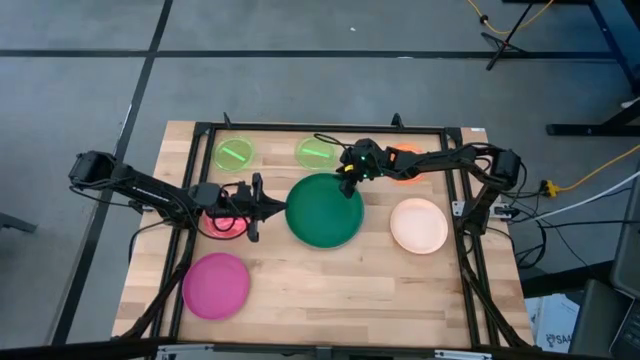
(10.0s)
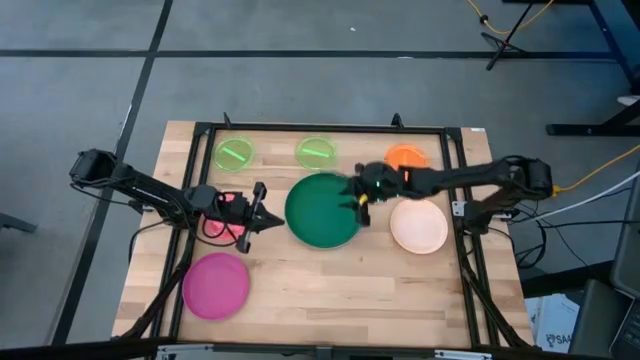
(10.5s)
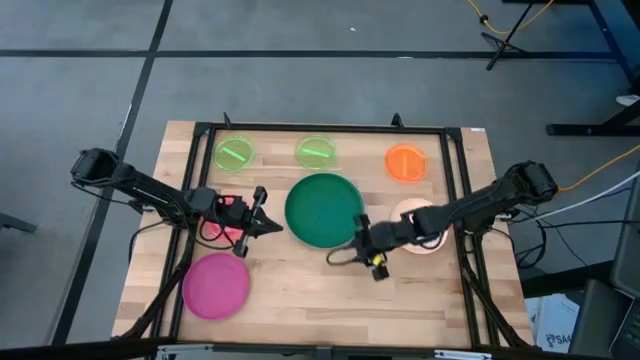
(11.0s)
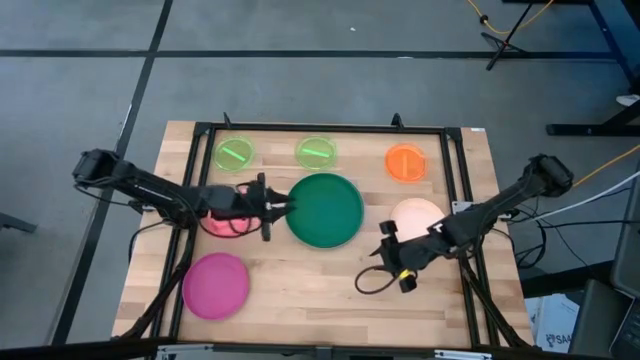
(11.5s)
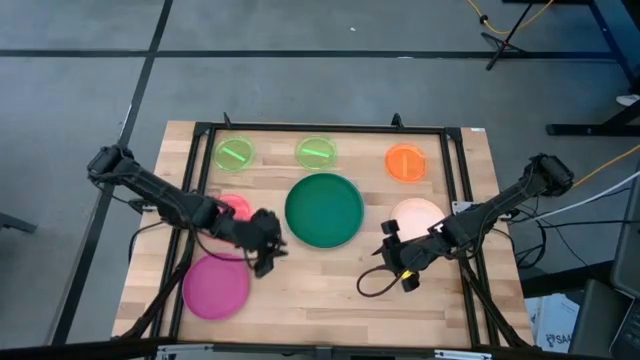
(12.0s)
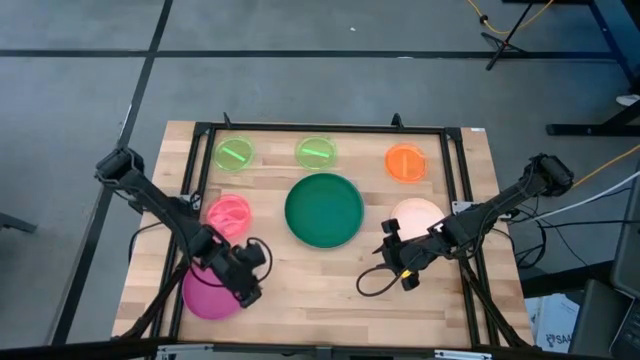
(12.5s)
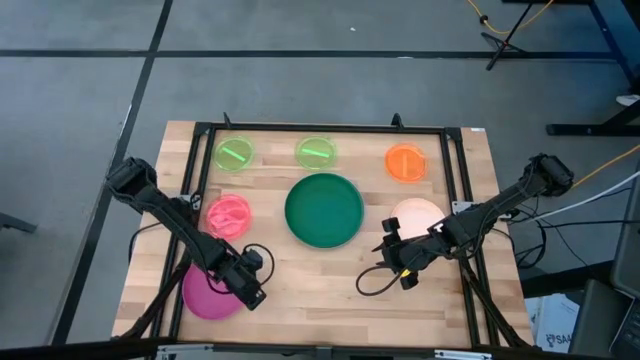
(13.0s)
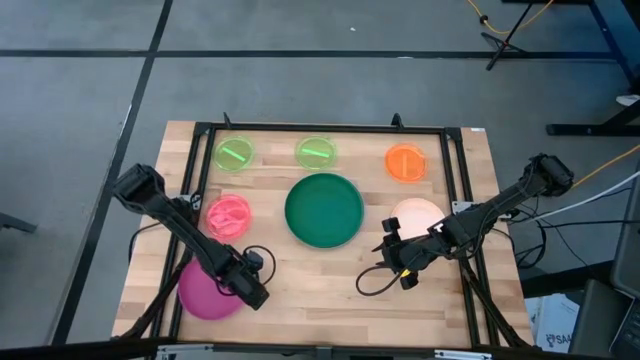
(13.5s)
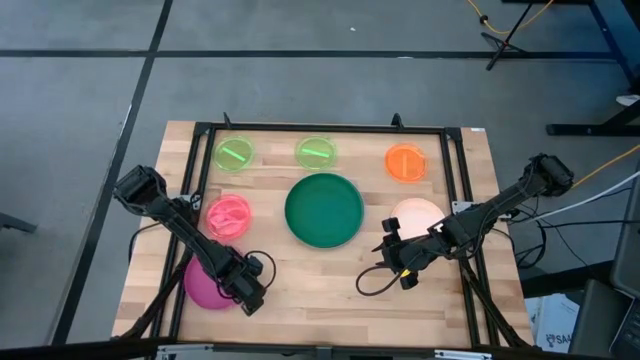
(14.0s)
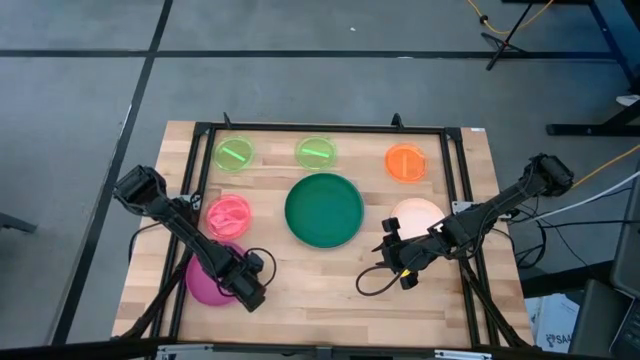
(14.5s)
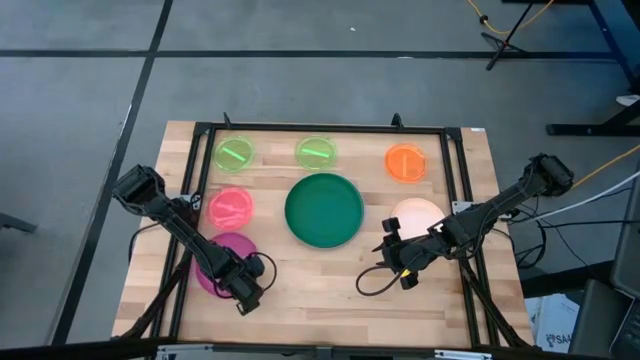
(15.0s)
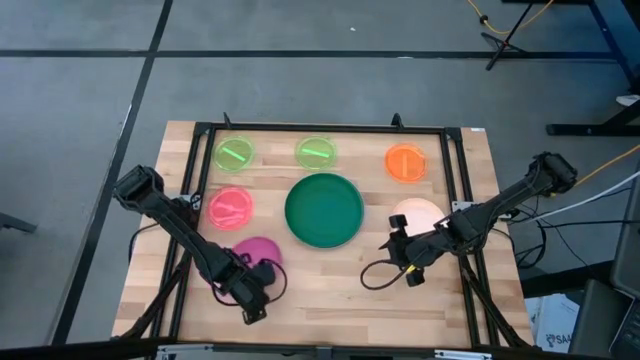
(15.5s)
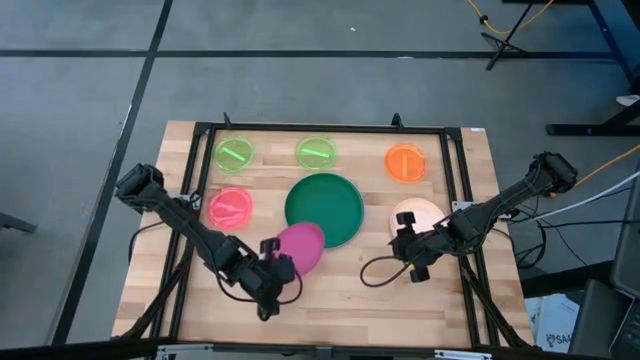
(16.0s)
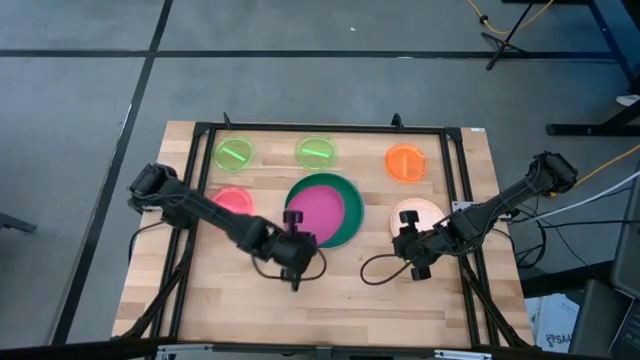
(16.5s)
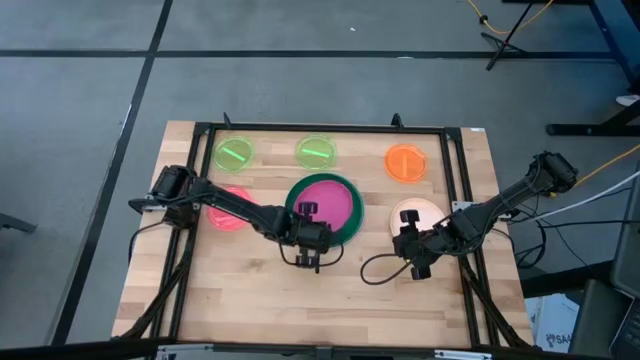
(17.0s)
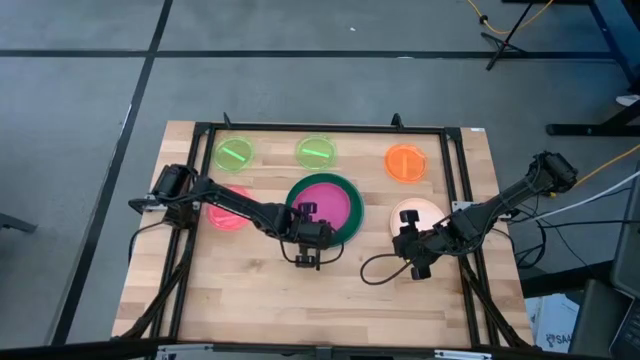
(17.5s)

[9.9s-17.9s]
Task: Stack plastic plates
Stack the pink plate on top of the dark green plate

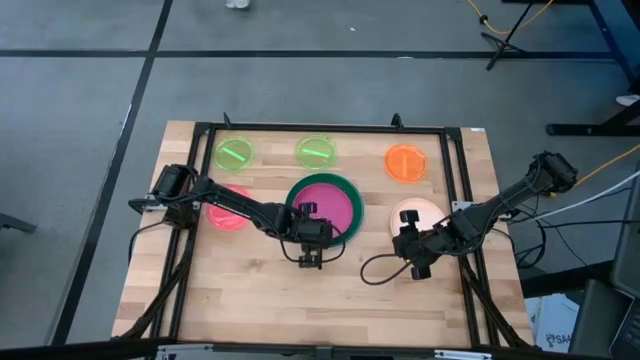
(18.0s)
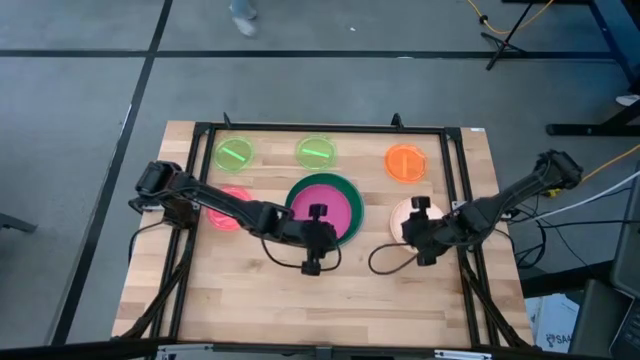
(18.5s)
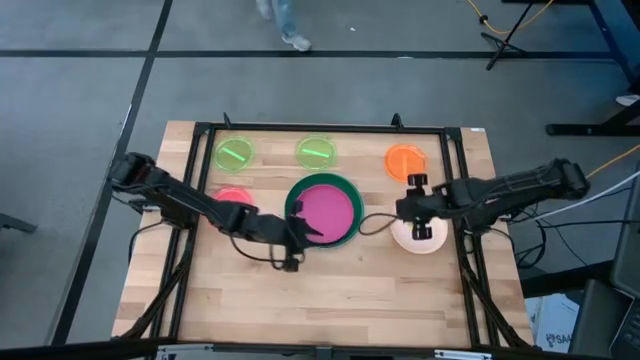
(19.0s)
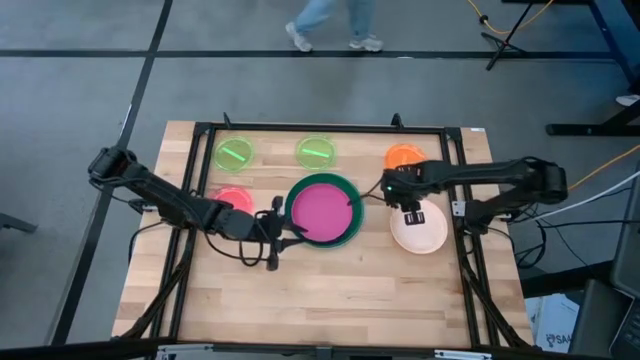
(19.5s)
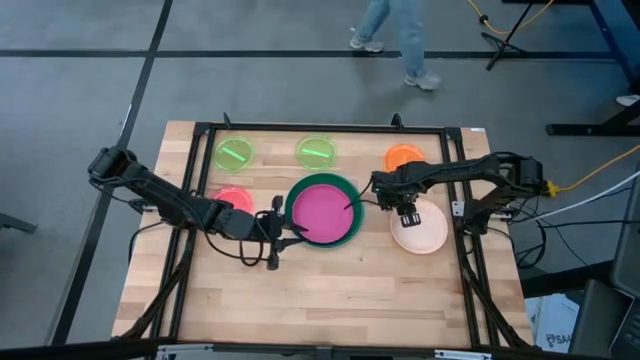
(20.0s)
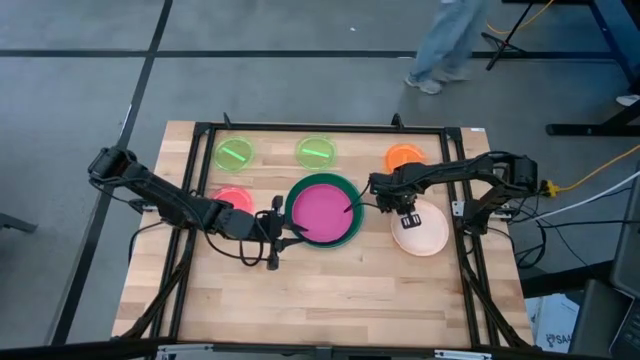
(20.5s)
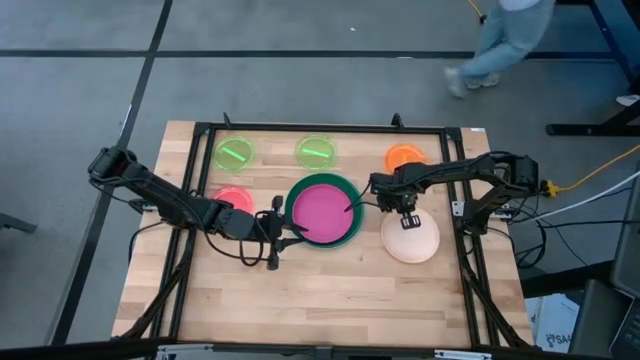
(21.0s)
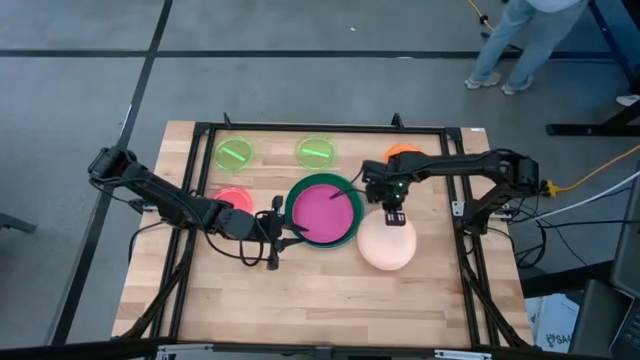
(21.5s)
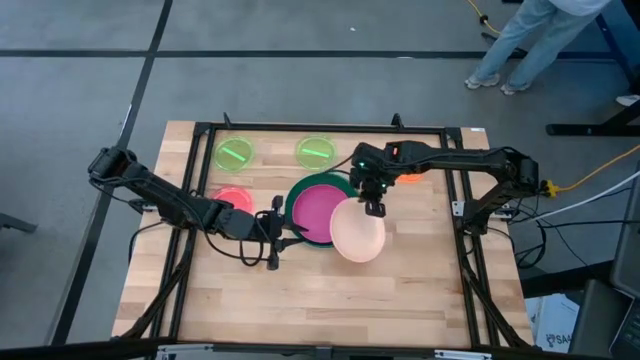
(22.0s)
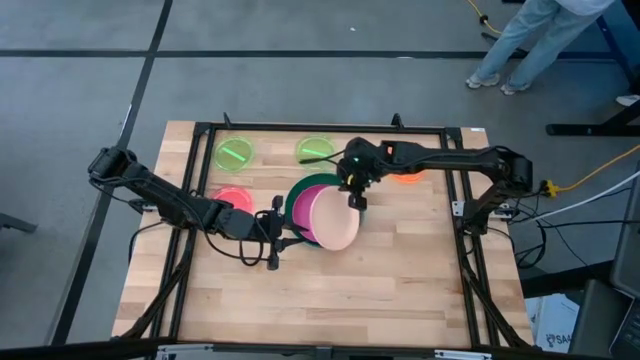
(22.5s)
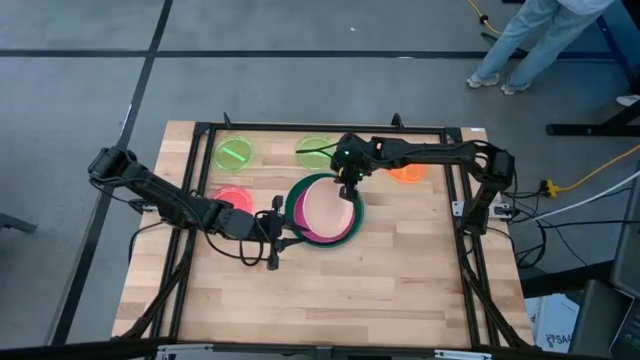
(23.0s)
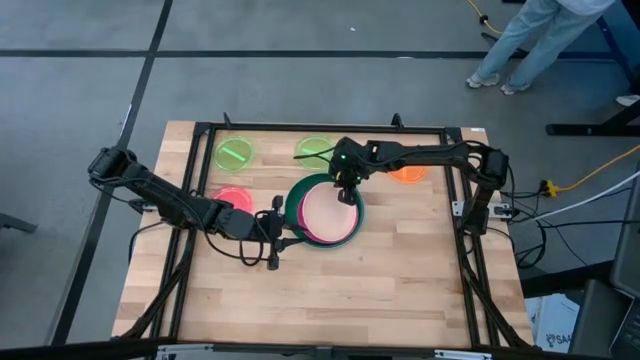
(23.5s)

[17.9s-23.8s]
Stack the light orange plate on top of the pink plate

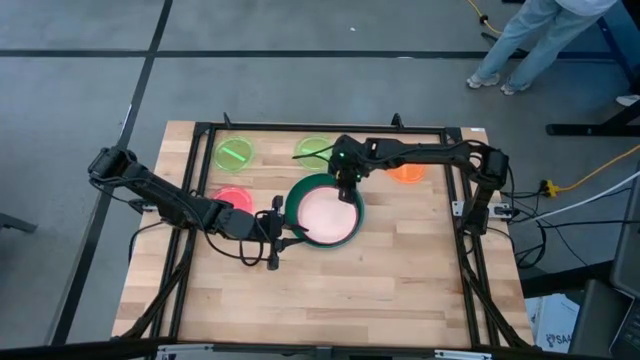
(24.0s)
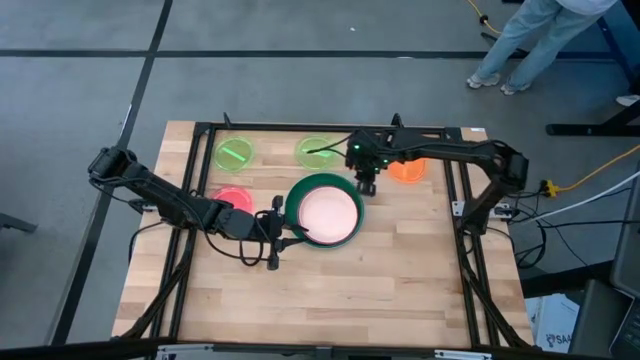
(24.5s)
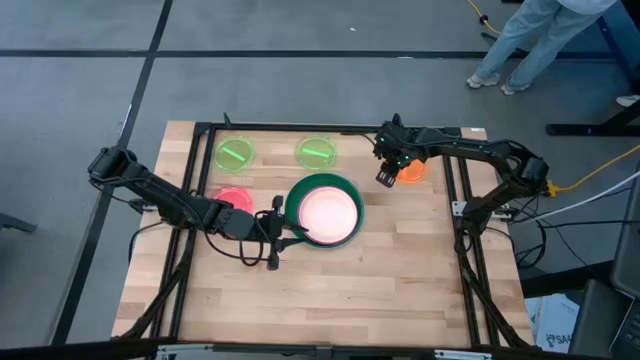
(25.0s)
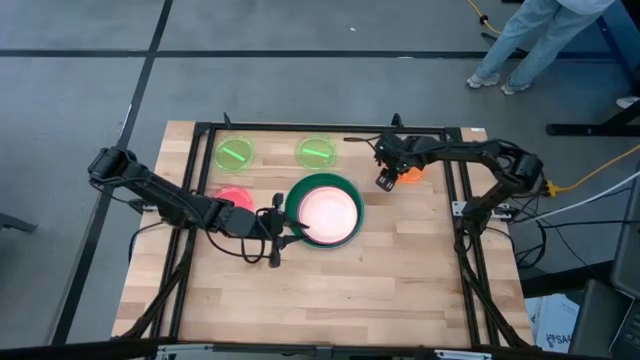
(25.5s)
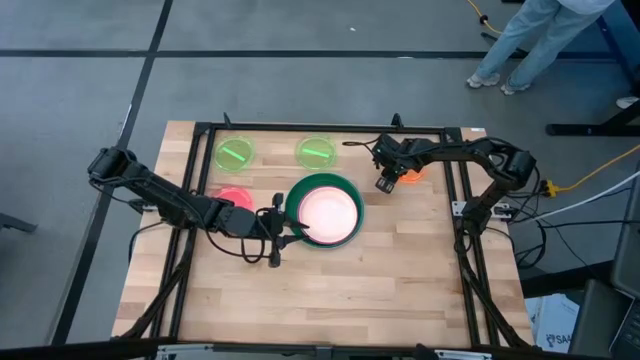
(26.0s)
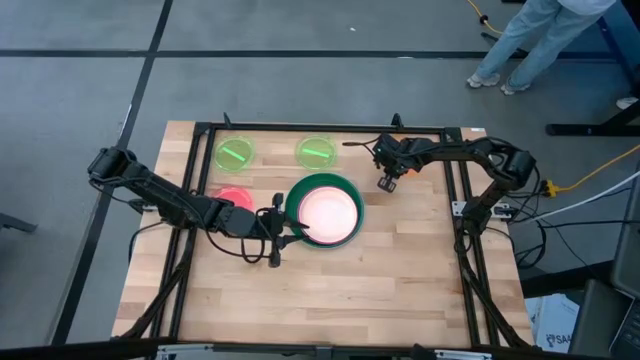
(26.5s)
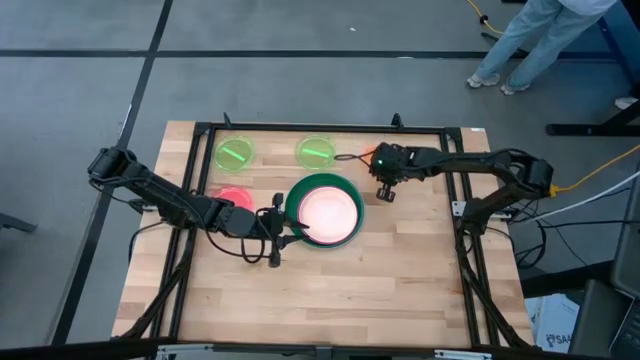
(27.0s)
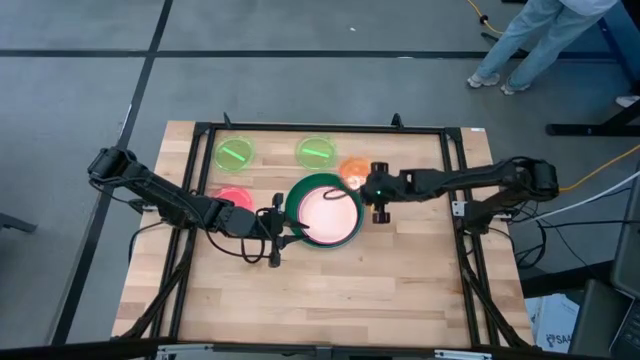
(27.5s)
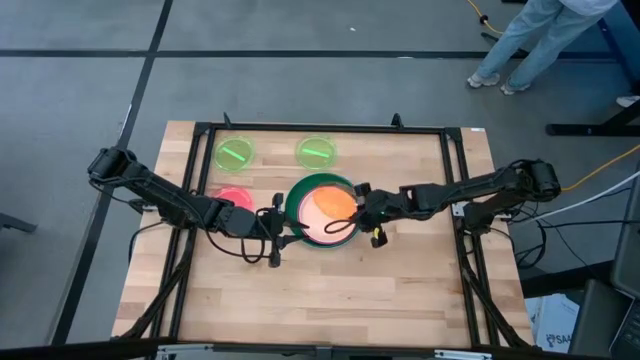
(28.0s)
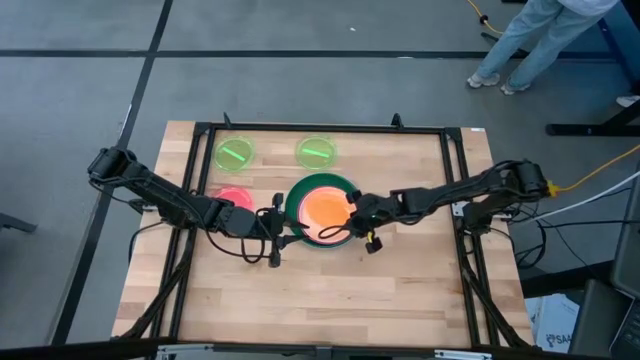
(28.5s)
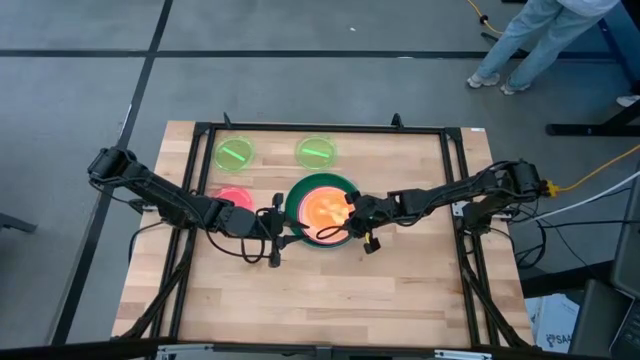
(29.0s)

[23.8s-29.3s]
Stack the orange plate on top of the light orange plate

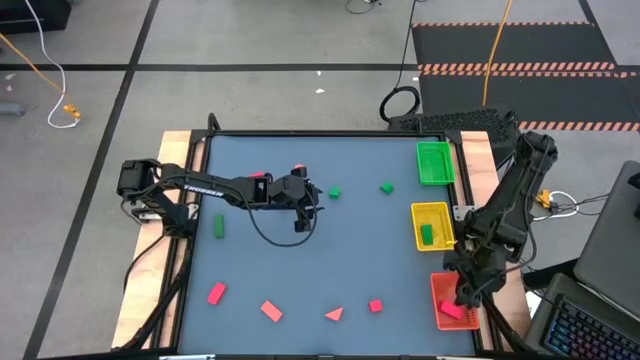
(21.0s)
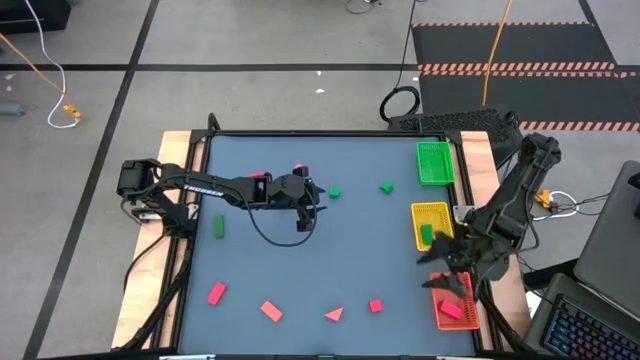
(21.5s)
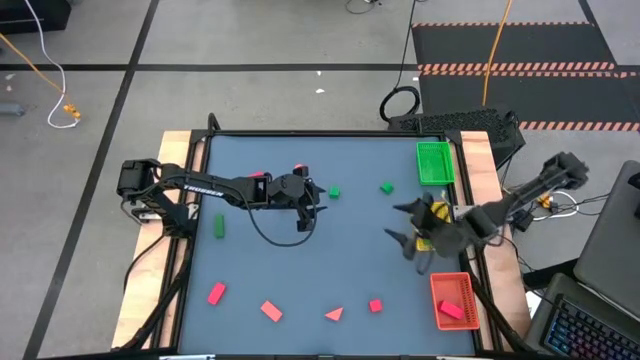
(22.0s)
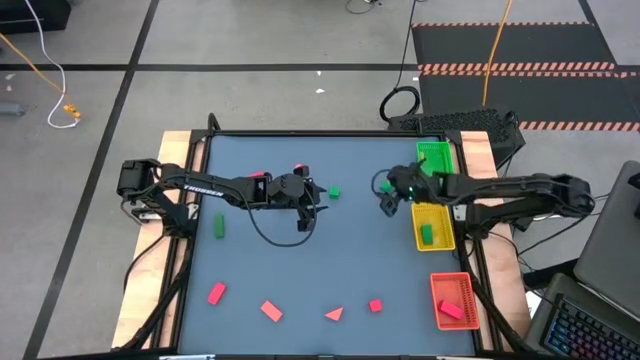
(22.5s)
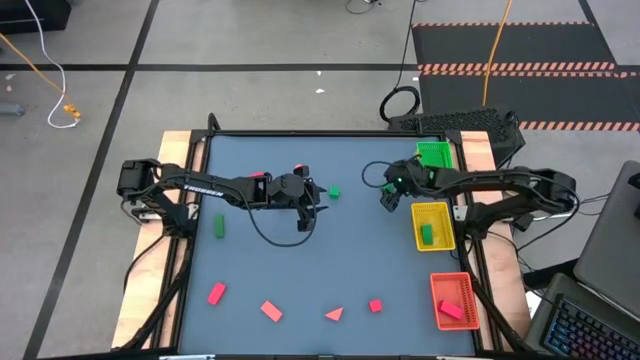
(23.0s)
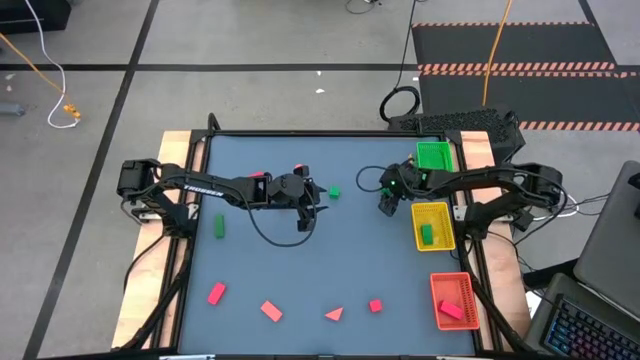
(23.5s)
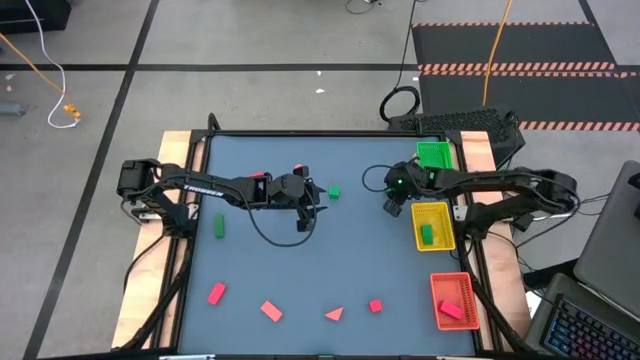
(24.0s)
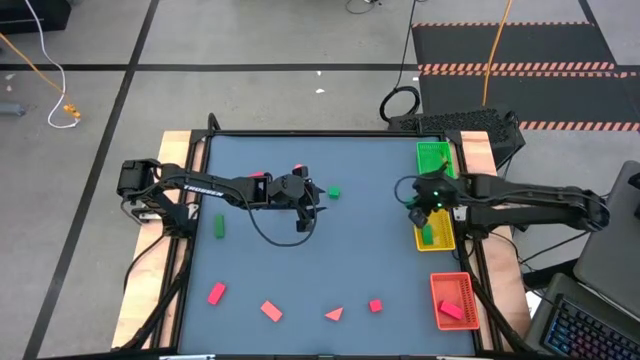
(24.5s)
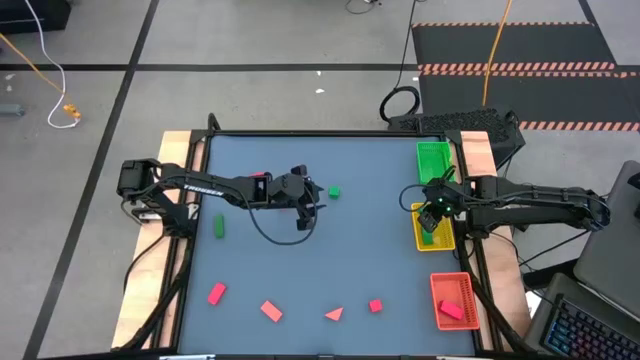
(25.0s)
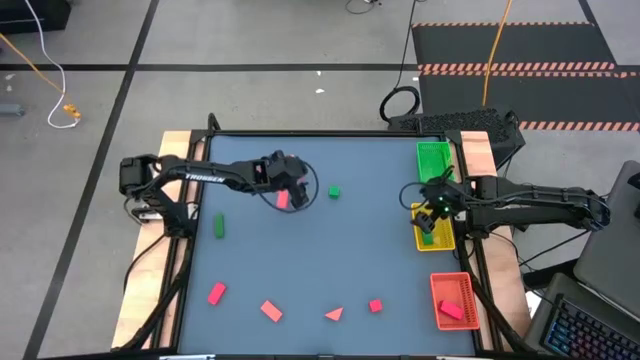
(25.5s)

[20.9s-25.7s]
Task: Sort & place blocks by color
Put the top right green block into the yellow basket
